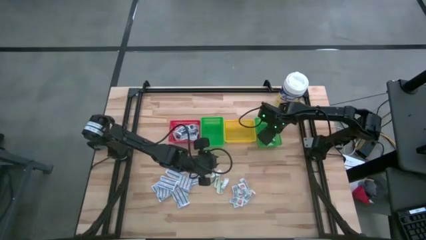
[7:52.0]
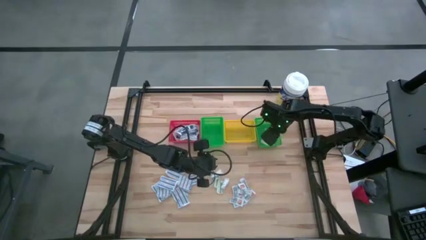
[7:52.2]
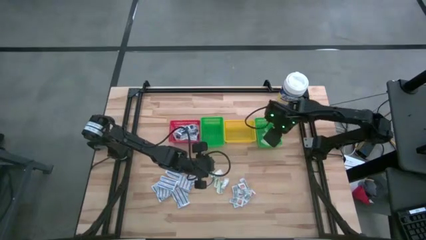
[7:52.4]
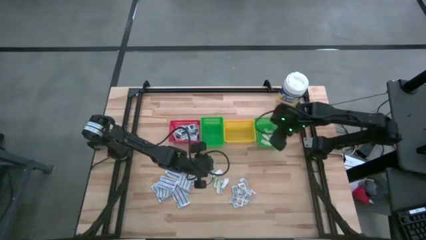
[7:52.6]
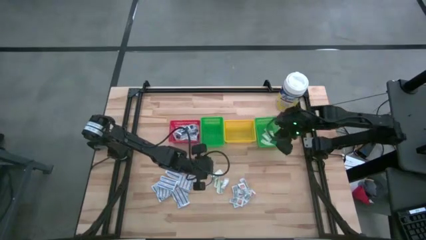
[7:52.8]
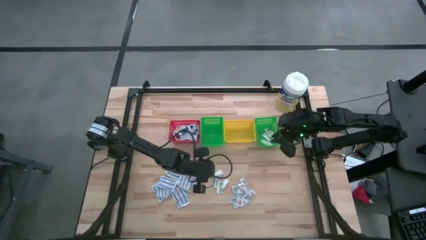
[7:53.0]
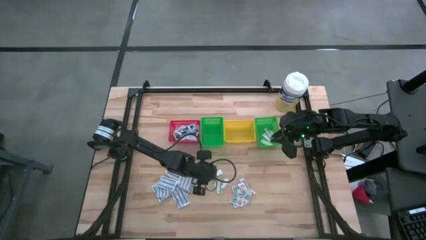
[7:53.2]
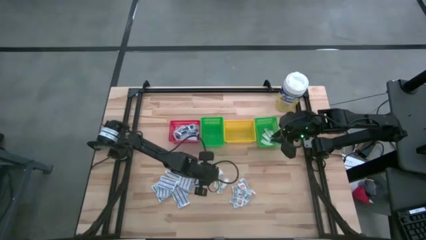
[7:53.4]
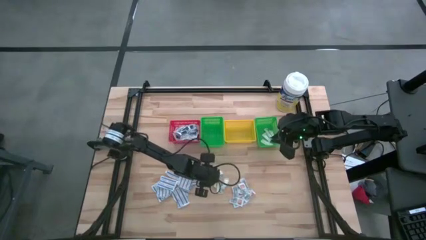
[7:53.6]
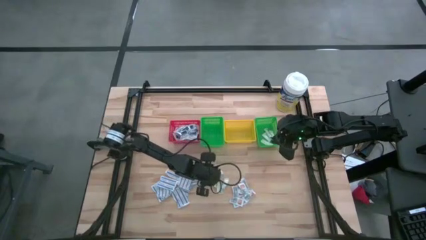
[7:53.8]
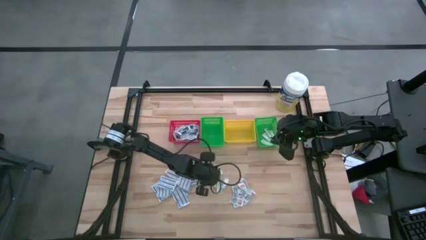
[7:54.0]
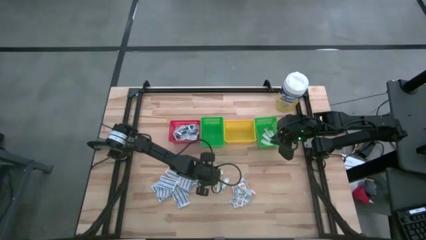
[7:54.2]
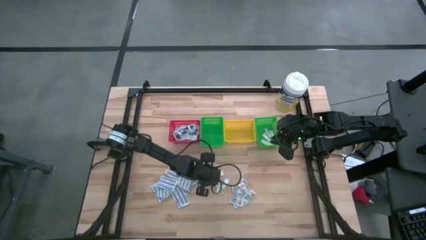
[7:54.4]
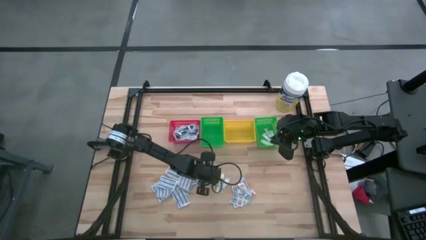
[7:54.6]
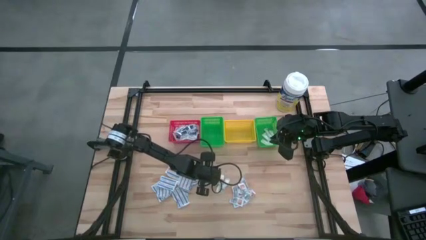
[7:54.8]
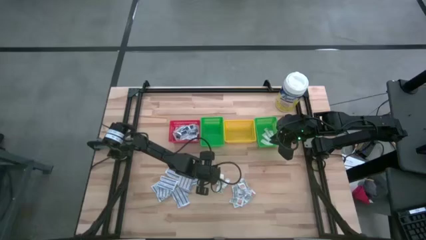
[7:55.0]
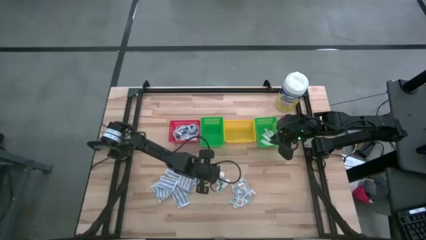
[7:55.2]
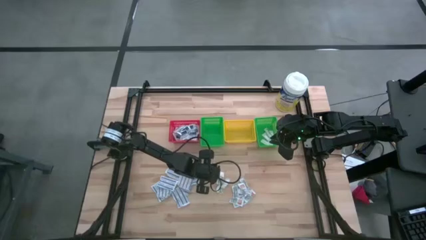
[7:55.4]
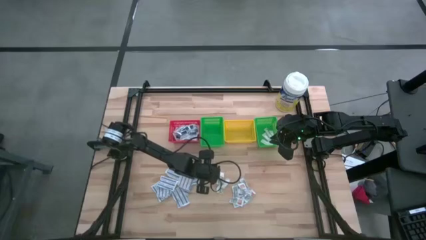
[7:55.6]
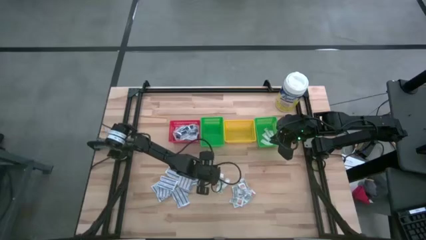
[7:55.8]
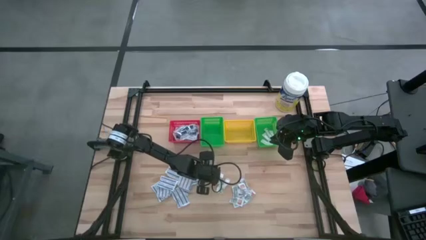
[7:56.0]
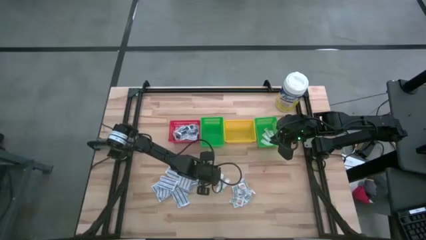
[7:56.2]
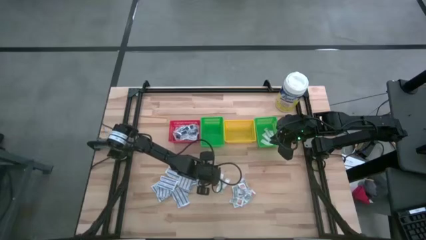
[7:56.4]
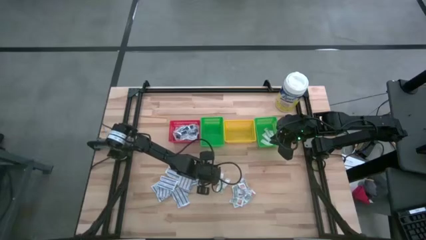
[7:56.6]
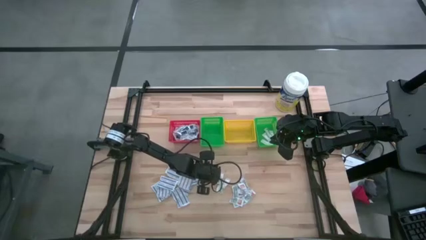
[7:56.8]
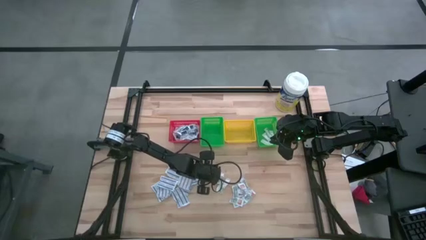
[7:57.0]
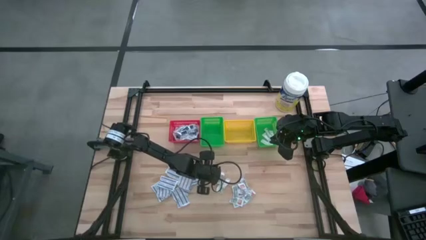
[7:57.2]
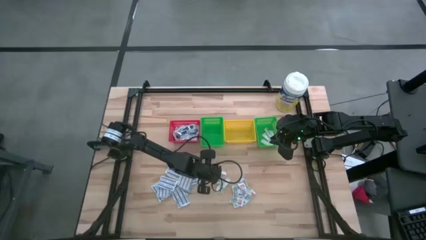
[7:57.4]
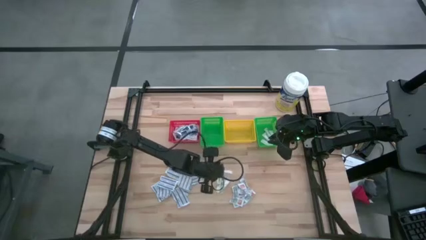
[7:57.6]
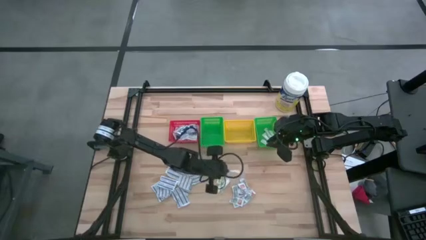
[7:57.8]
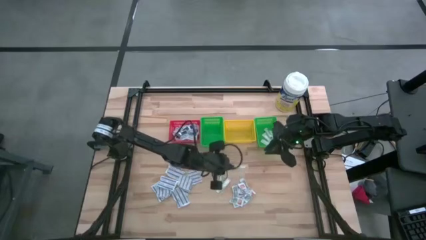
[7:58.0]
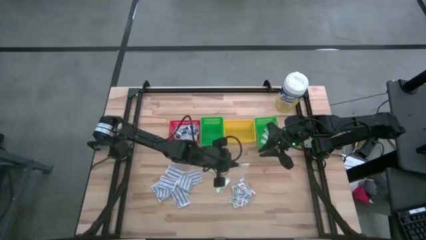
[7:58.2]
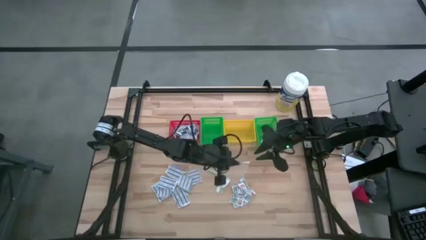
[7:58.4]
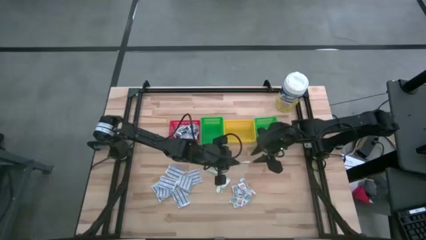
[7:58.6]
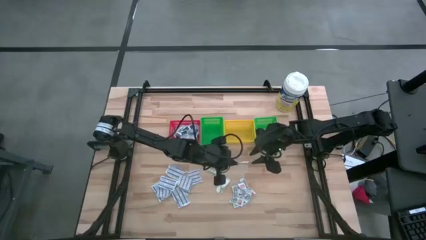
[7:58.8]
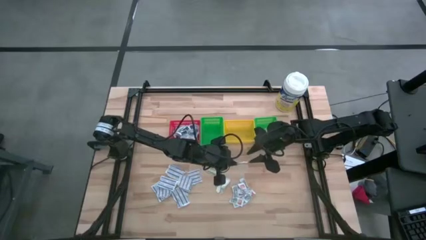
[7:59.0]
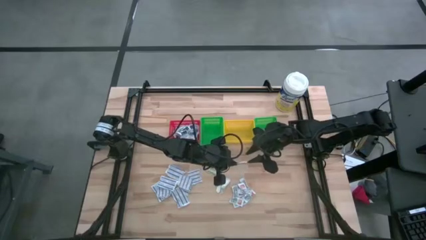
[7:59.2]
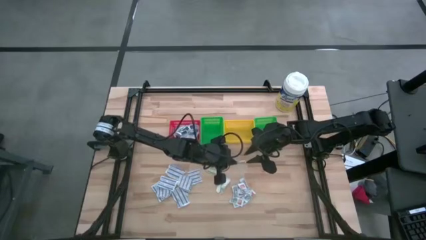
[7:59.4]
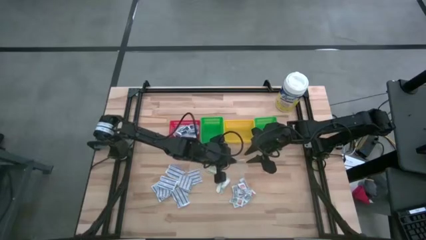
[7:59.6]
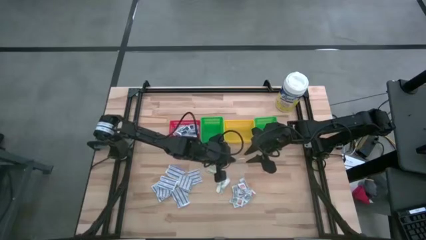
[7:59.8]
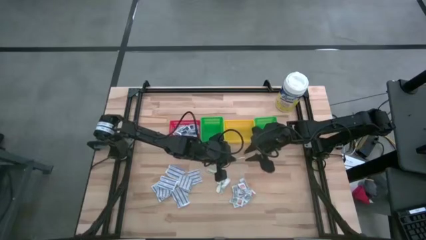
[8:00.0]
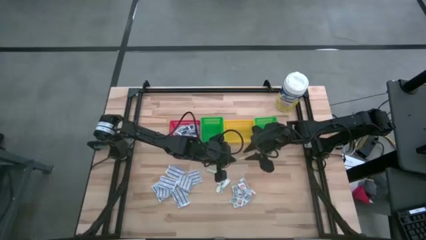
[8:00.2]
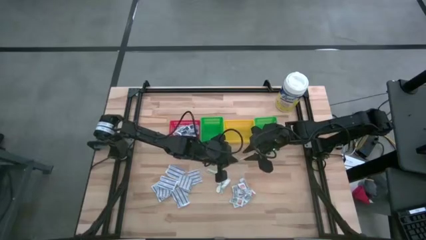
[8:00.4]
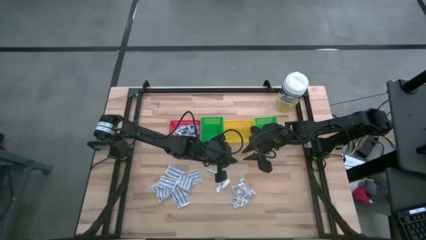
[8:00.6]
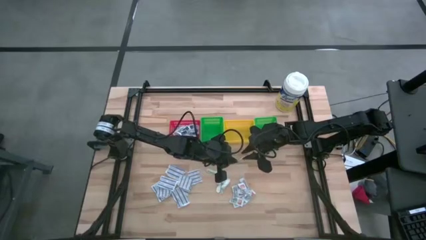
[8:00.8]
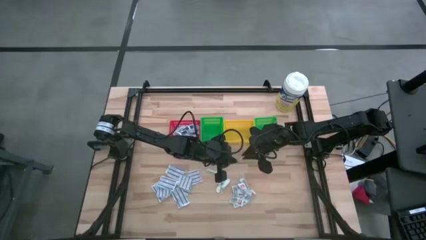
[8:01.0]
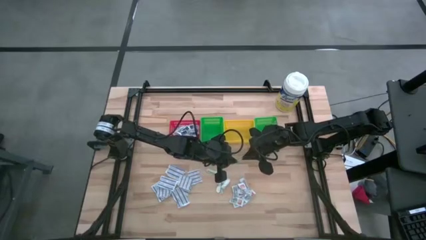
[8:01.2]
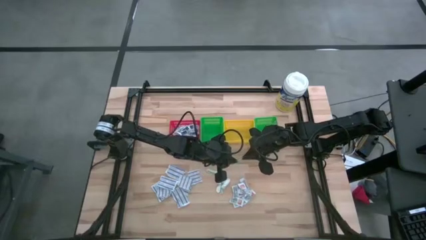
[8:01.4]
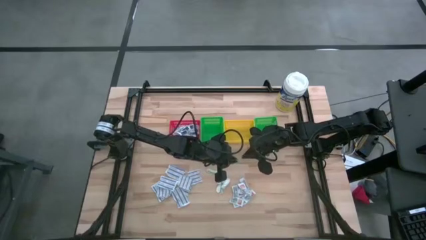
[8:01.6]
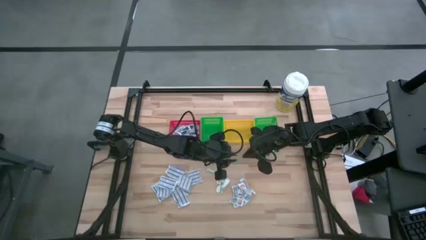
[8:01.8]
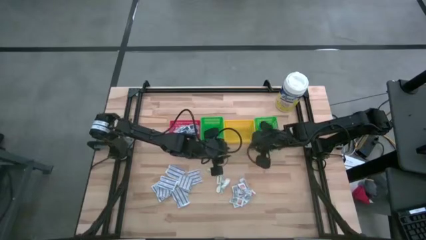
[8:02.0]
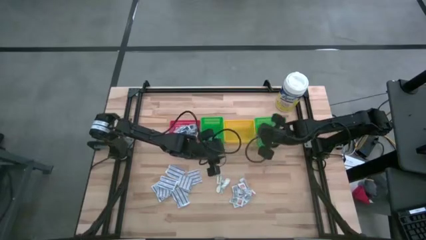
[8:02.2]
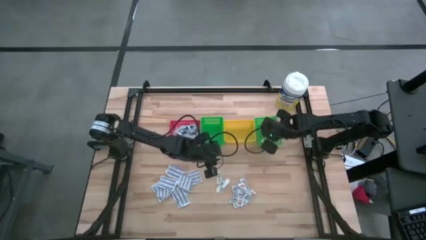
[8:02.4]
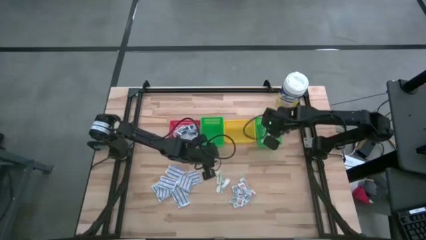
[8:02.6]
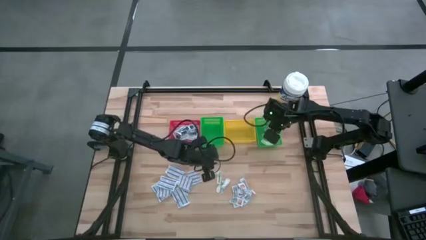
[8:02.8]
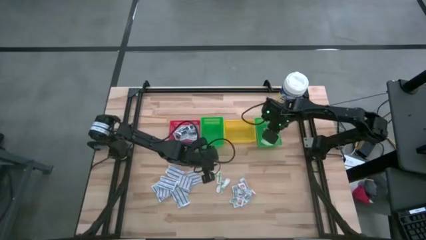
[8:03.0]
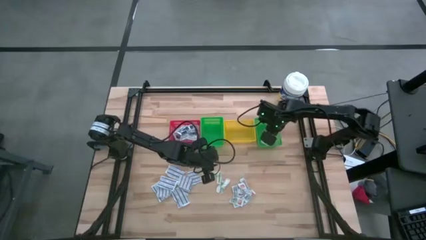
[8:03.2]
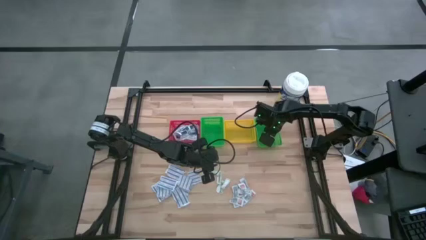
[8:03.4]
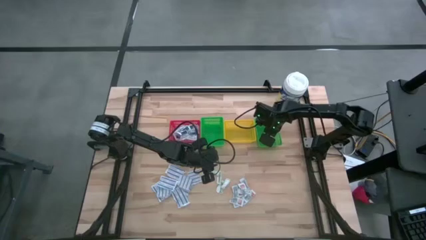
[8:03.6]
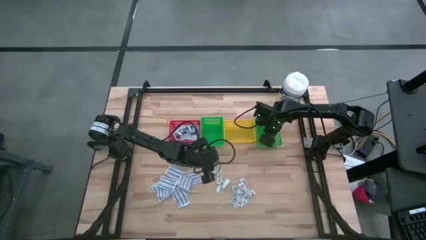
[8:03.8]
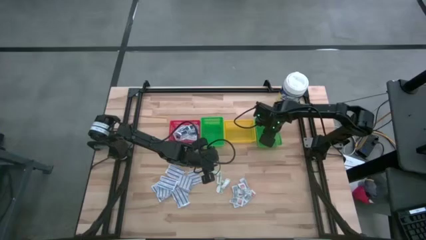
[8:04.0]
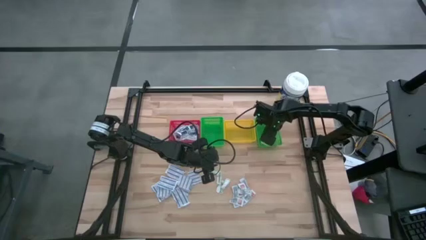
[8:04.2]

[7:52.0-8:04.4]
Task: Pick & Place First Aid Supplies
Put the green bandage into the right green basket

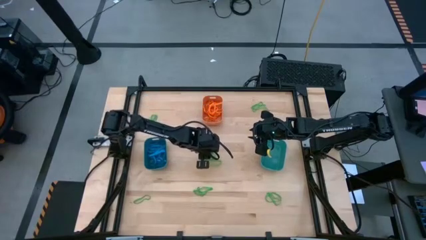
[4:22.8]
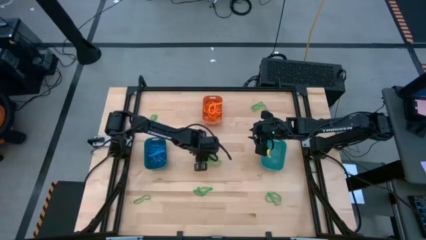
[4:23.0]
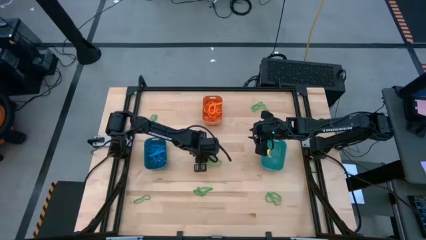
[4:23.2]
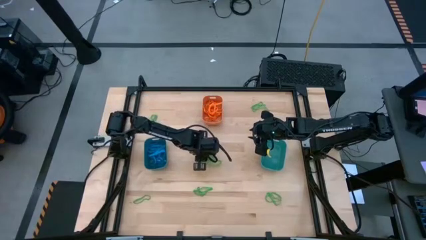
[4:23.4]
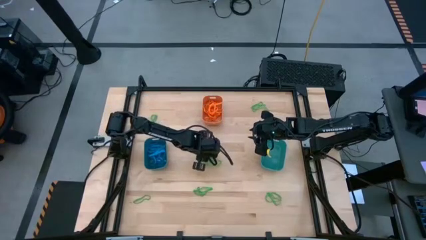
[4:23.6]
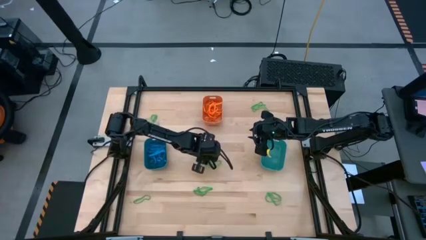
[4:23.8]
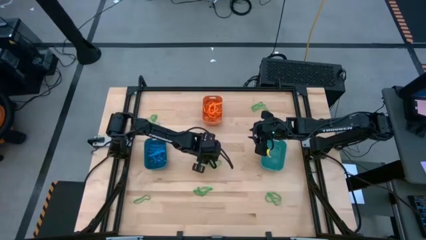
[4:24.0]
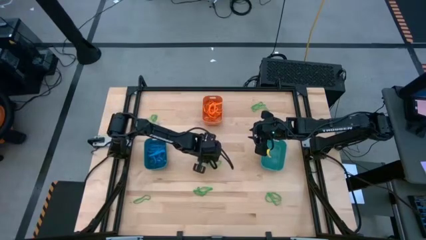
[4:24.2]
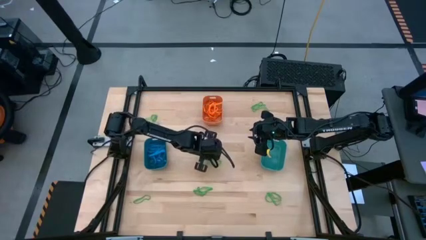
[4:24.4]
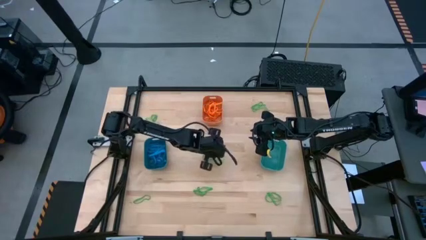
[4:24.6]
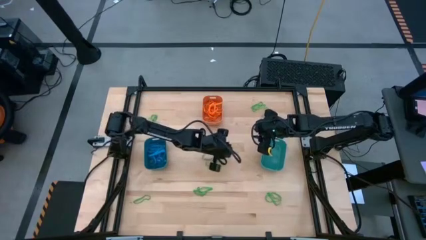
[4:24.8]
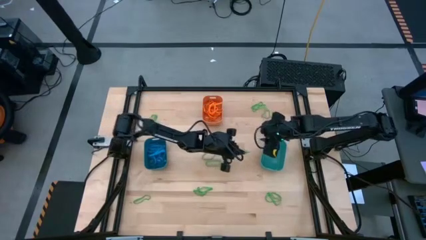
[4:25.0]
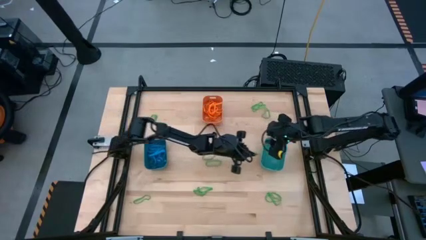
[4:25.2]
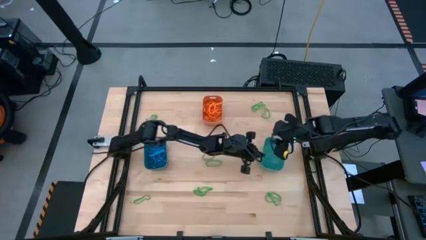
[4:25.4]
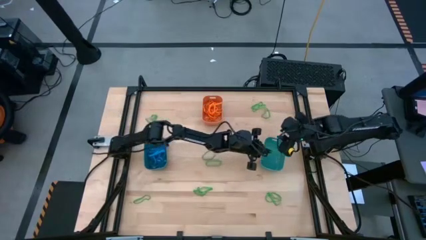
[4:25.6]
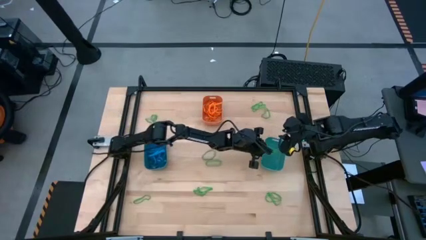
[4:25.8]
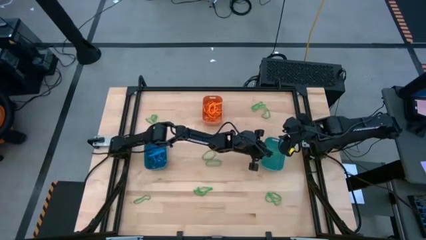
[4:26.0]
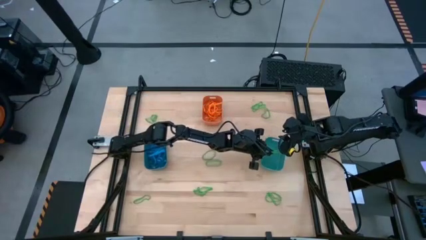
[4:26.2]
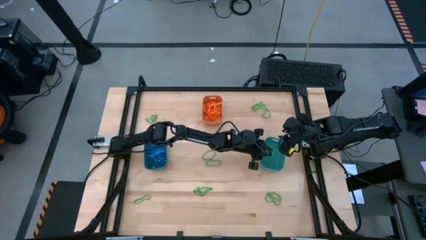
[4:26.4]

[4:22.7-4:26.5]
Task: Sort rubber bands into baskets
Put the green rubber band into the green bin
